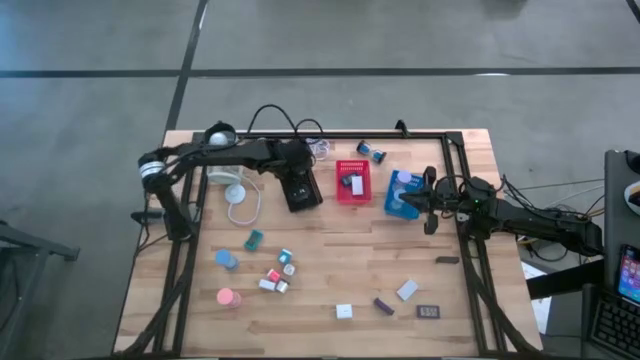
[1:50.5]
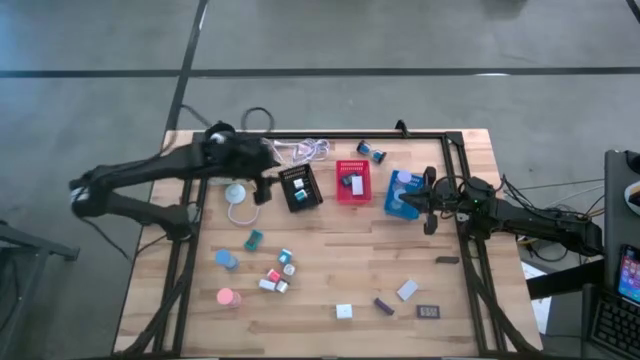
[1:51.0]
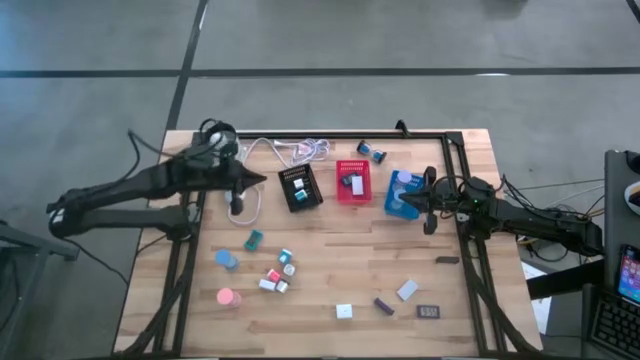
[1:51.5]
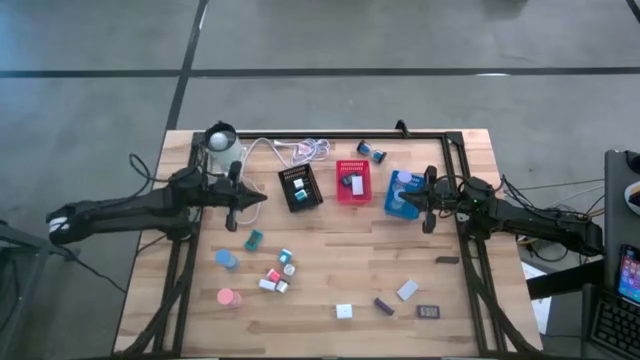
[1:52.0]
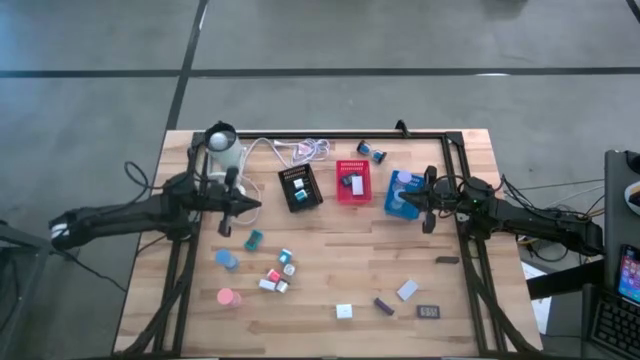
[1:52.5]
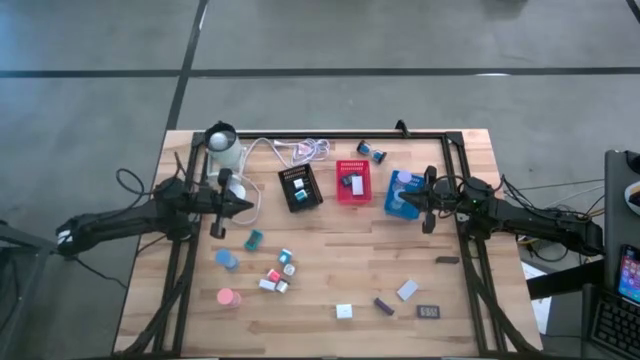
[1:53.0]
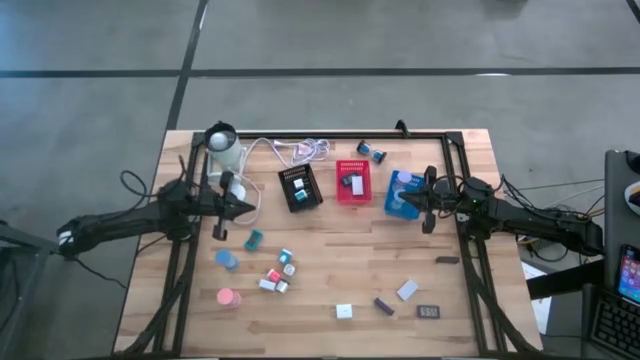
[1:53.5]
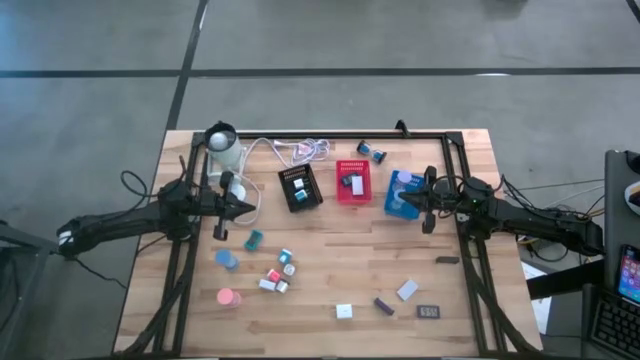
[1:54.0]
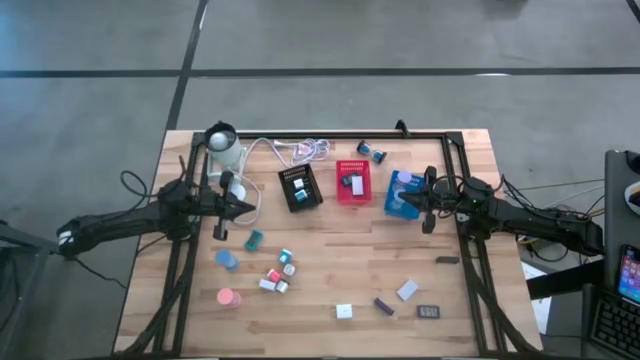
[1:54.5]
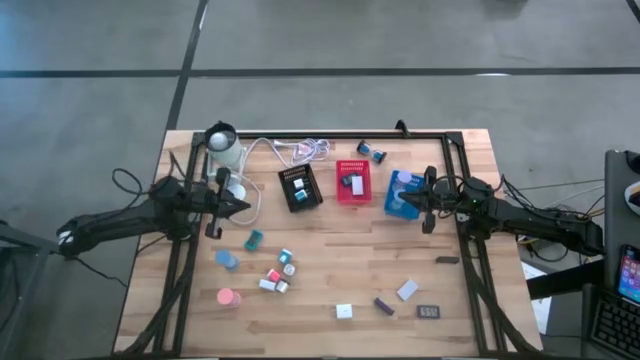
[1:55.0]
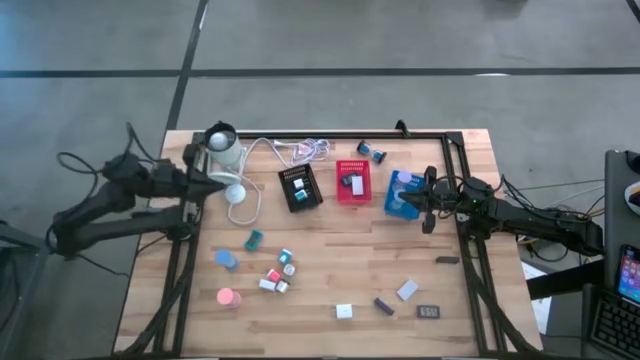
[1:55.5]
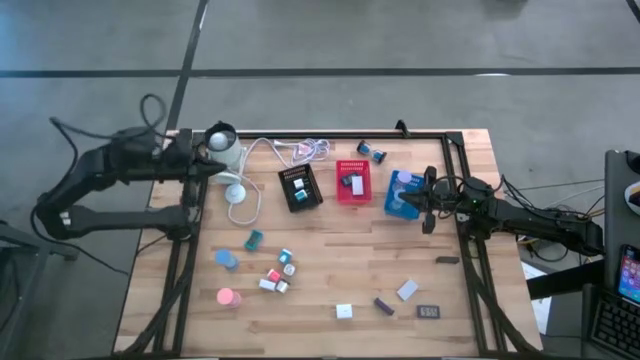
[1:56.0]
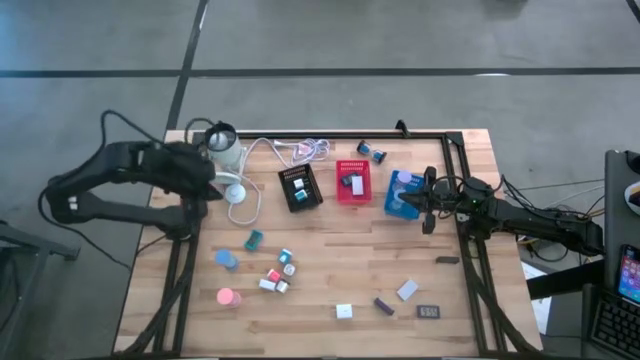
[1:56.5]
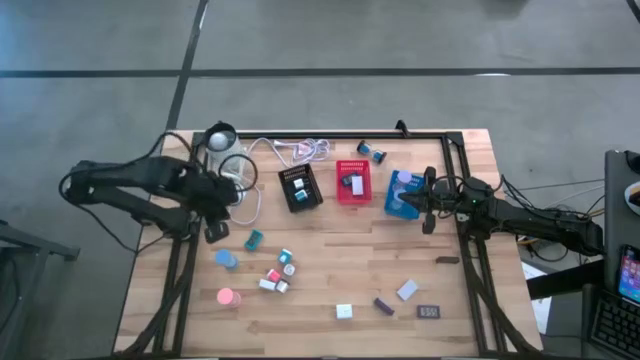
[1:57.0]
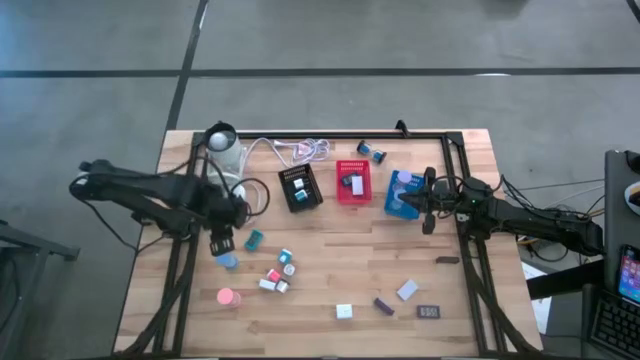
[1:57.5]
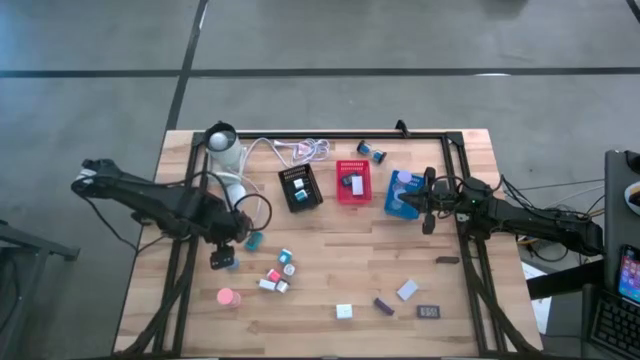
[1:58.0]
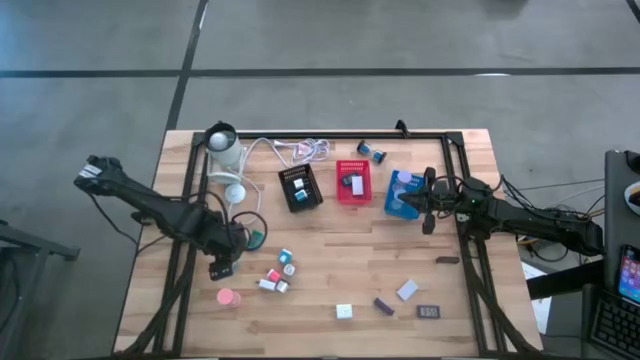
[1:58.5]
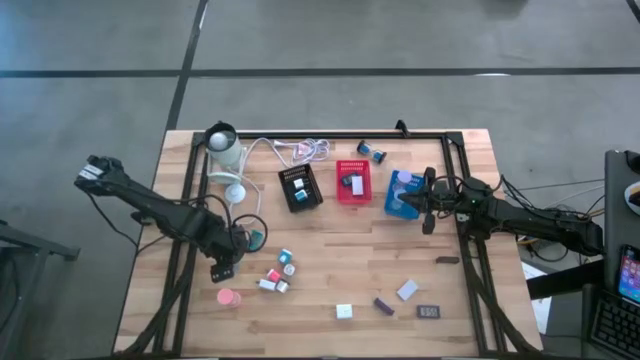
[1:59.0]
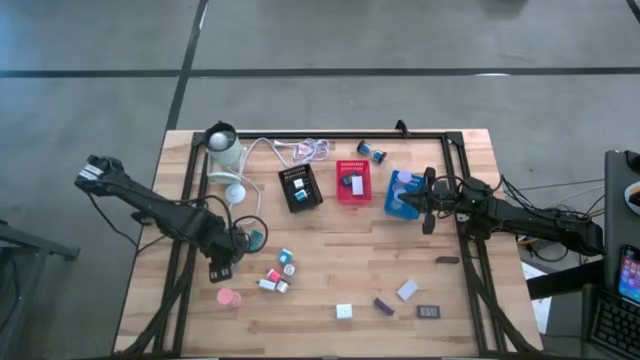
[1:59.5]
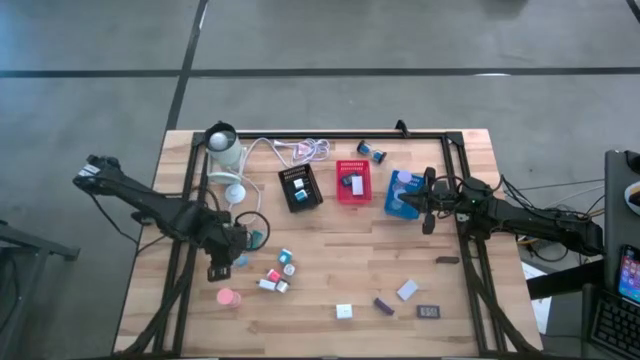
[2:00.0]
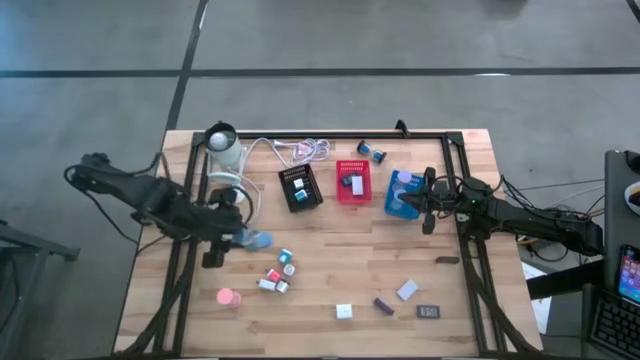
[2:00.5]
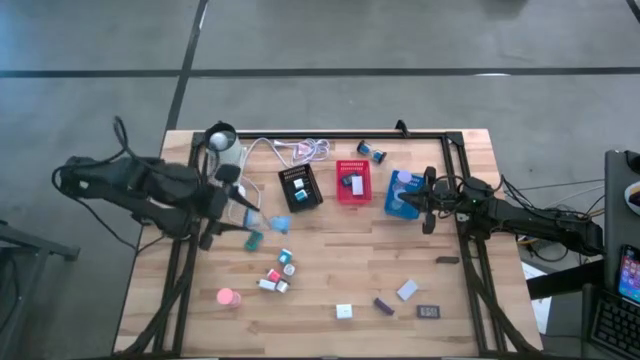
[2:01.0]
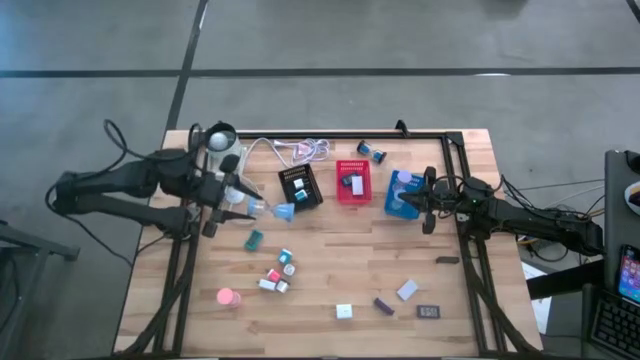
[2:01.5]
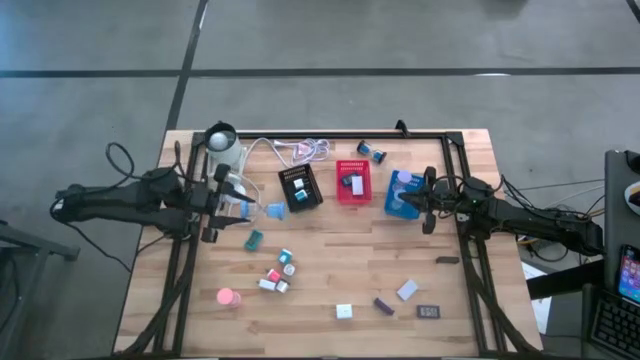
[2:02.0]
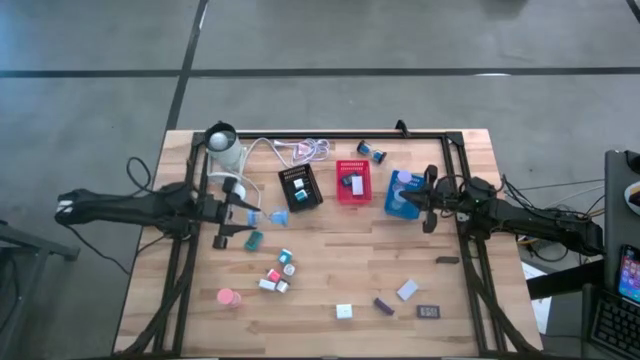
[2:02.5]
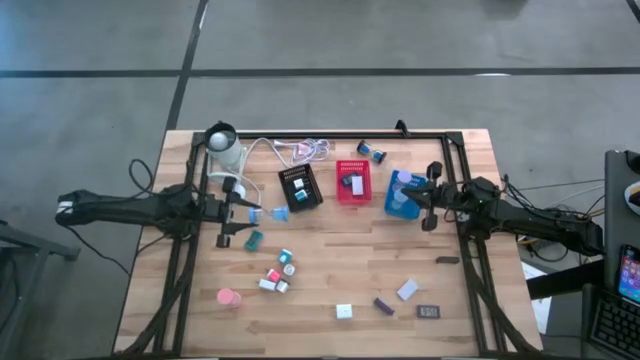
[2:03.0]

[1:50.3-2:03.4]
Task: Pick & Place Office items
Put the light blue hourglass into the blue bin

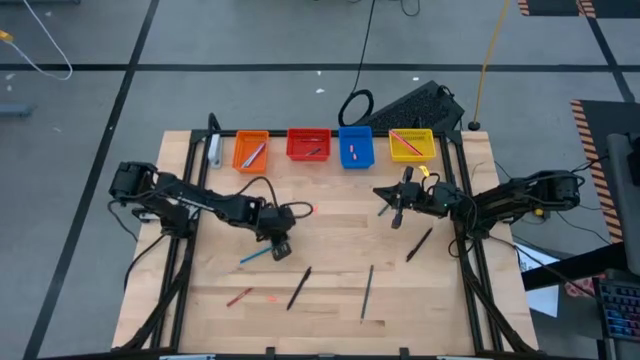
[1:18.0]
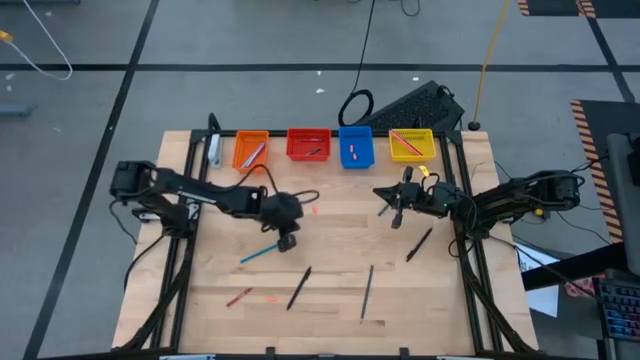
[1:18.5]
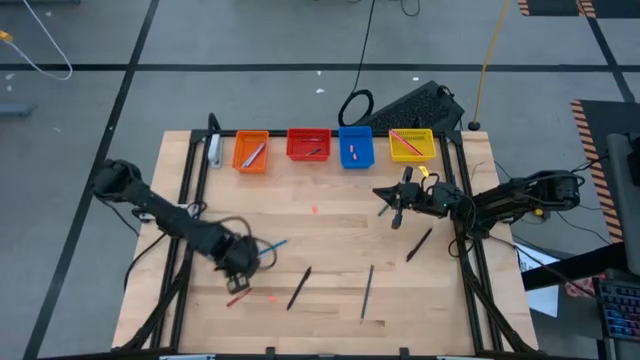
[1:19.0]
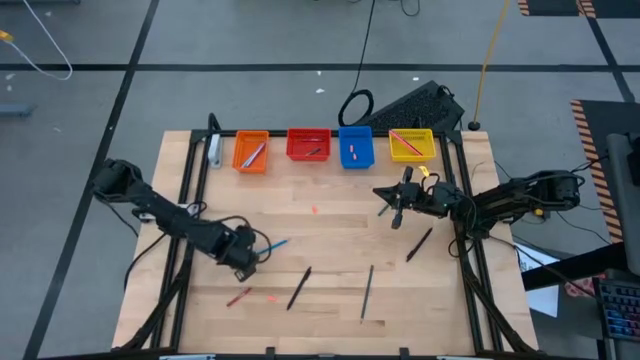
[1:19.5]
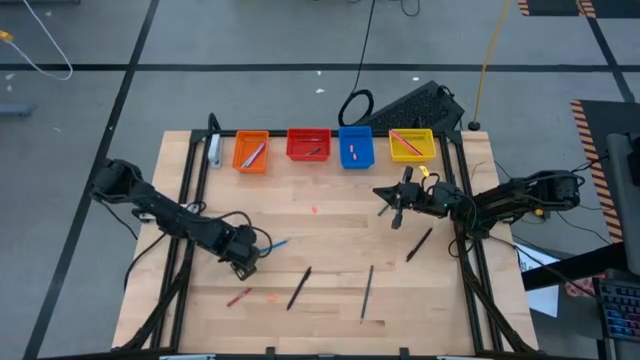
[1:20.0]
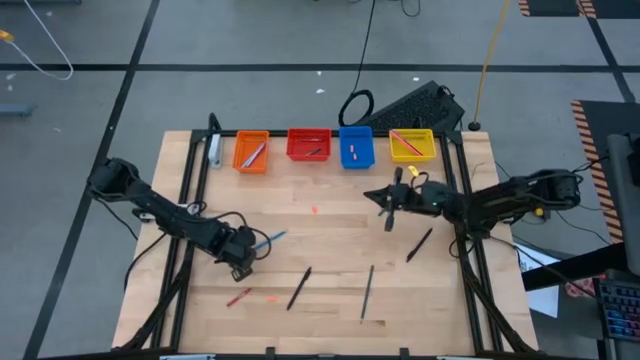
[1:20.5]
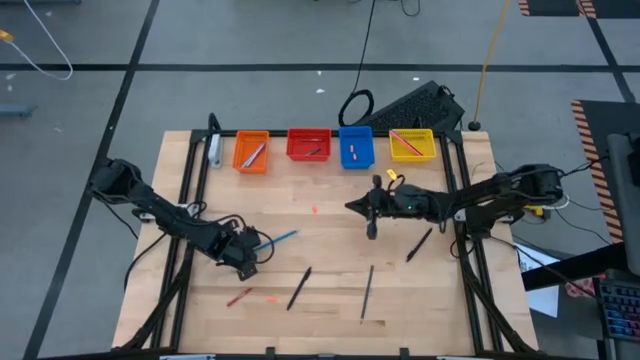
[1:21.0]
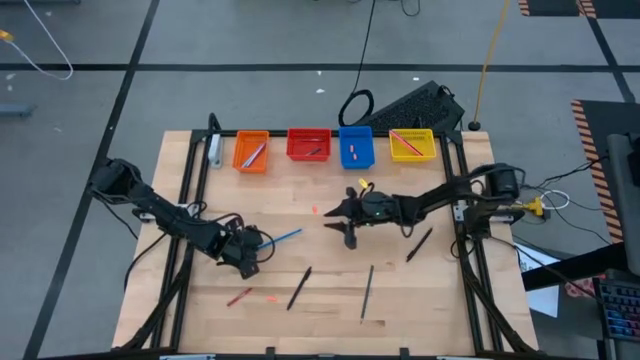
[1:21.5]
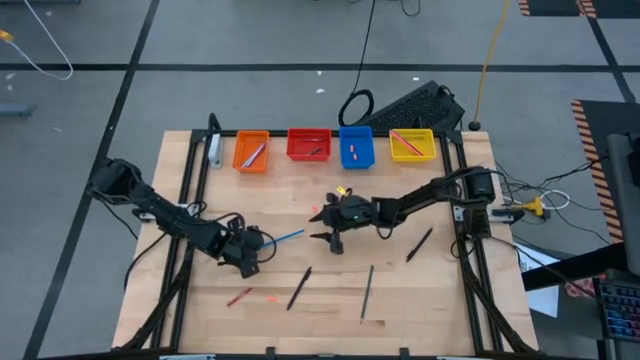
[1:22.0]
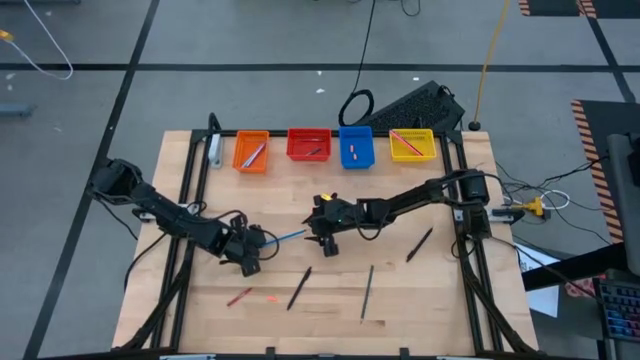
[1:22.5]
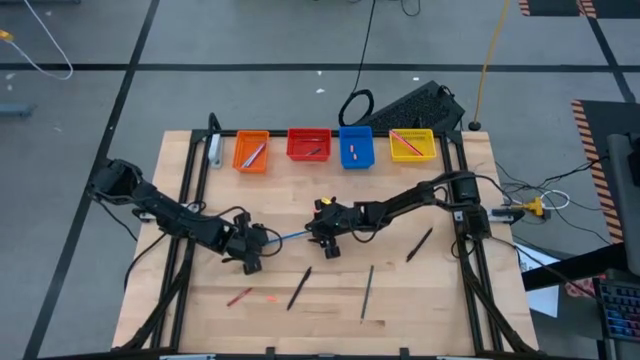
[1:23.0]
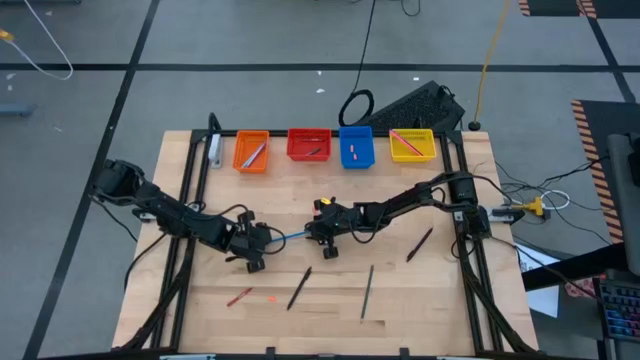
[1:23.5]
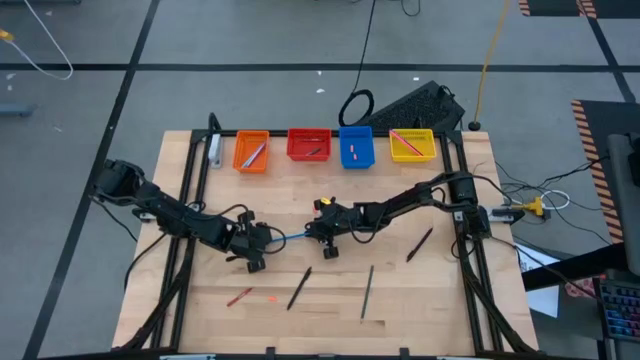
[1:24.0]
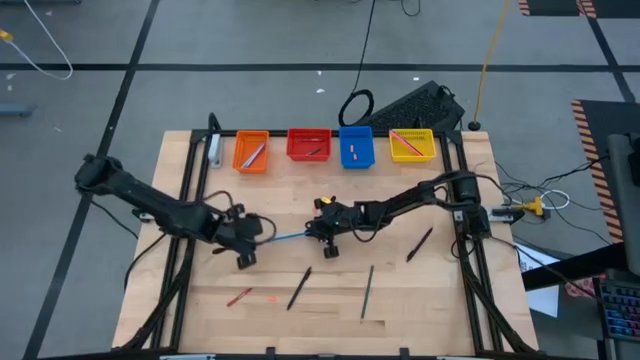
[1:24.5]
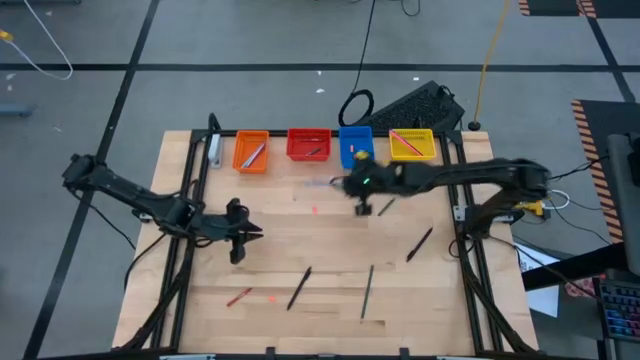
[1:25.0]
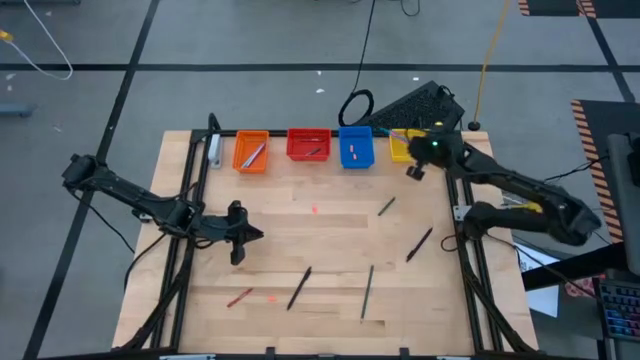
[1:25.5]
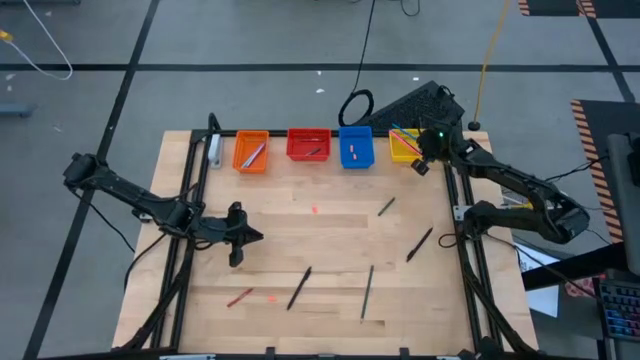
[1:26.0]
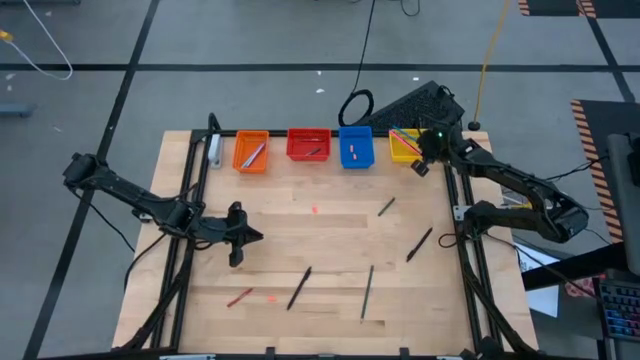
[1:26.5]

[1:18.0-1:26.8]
Task: Sort crayons/erasers/pens/pencils in bins
Put the blue pencil into the yellow basket
